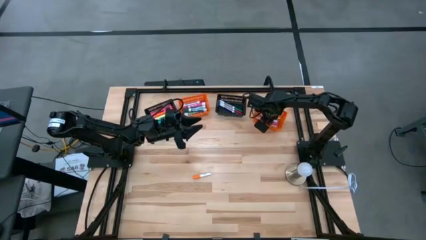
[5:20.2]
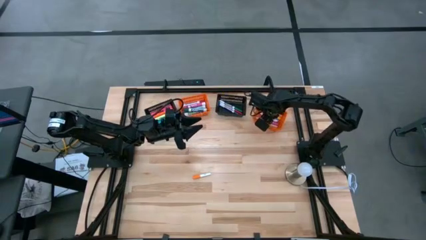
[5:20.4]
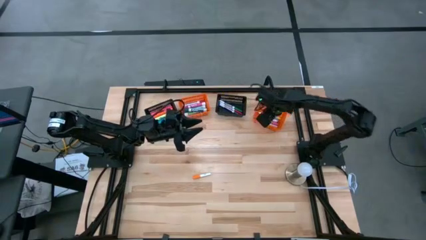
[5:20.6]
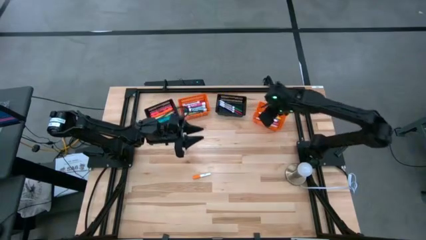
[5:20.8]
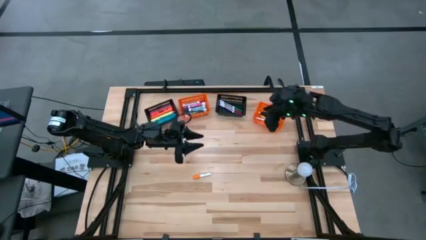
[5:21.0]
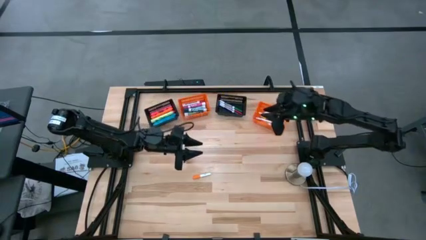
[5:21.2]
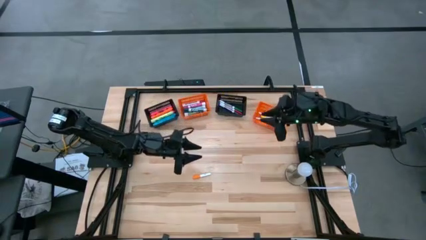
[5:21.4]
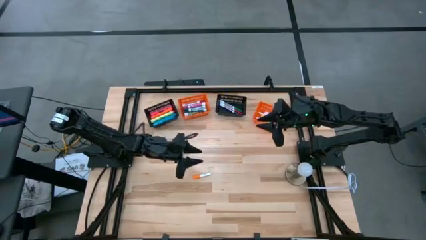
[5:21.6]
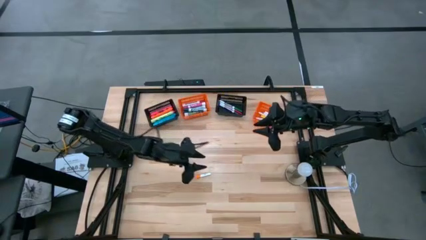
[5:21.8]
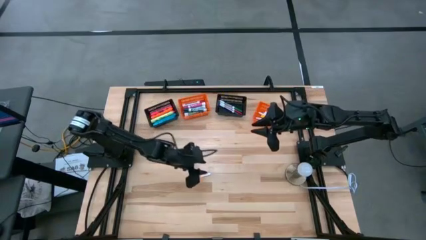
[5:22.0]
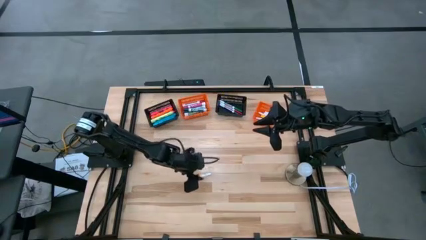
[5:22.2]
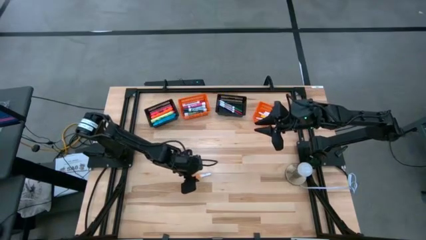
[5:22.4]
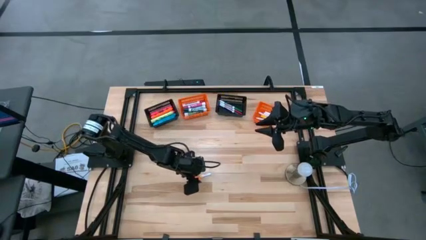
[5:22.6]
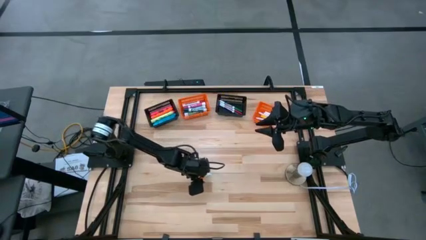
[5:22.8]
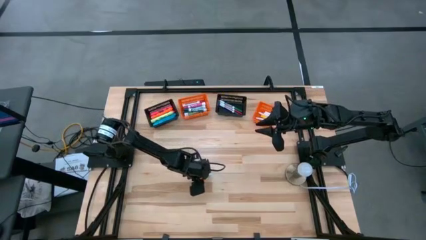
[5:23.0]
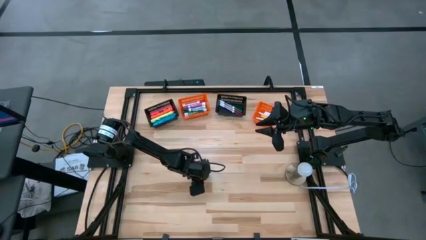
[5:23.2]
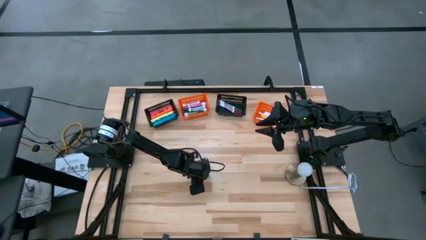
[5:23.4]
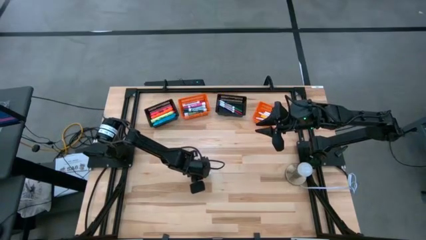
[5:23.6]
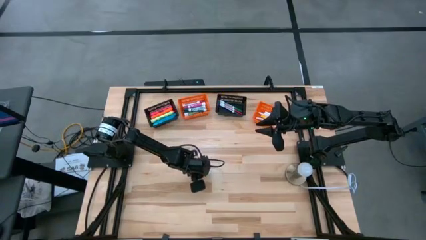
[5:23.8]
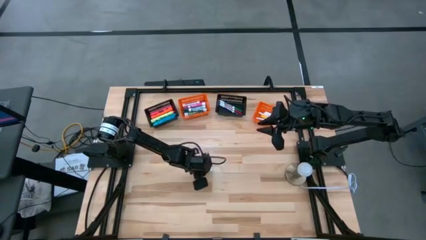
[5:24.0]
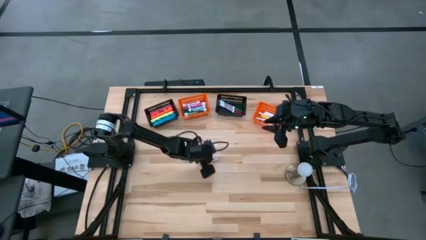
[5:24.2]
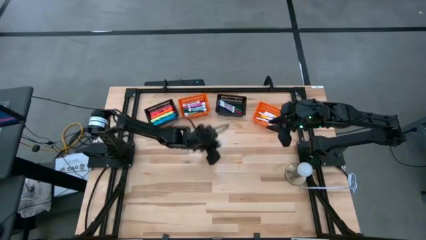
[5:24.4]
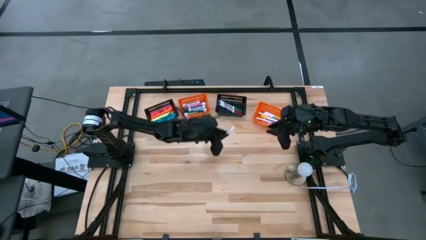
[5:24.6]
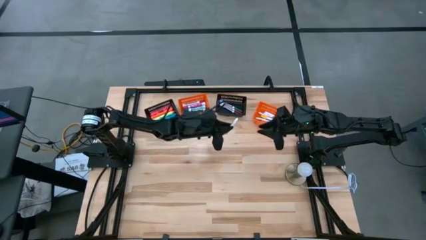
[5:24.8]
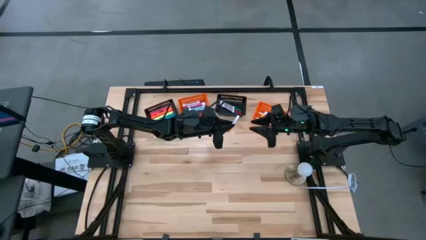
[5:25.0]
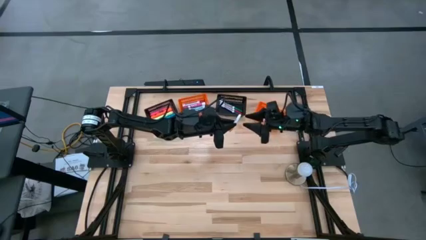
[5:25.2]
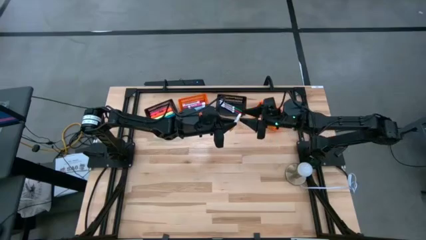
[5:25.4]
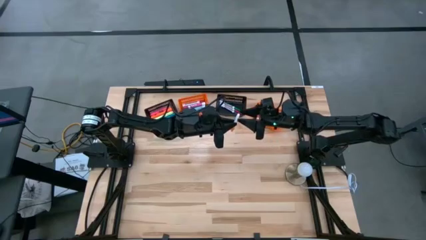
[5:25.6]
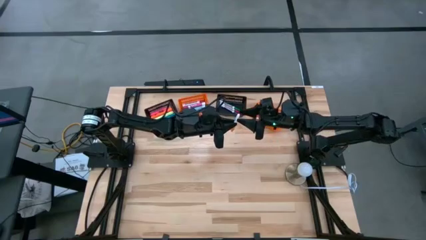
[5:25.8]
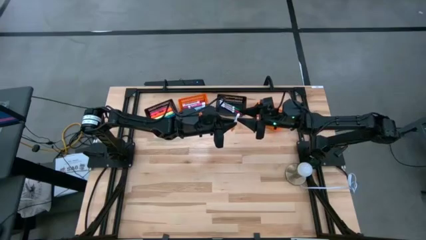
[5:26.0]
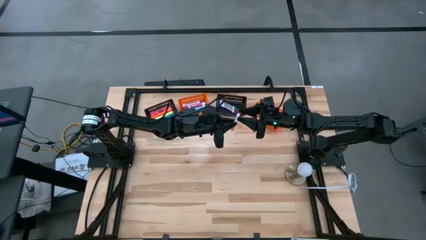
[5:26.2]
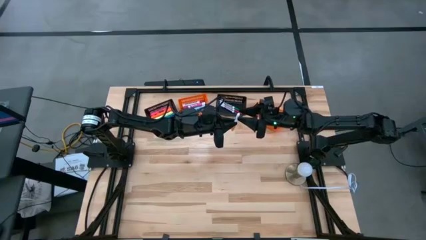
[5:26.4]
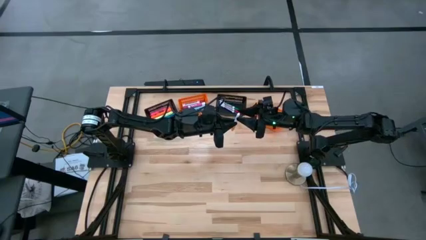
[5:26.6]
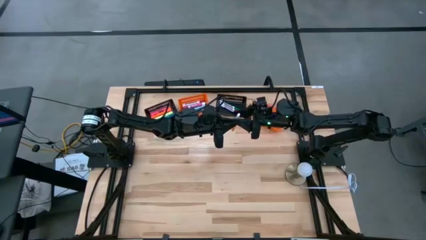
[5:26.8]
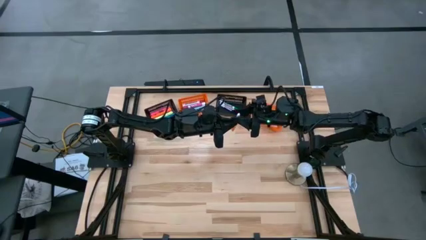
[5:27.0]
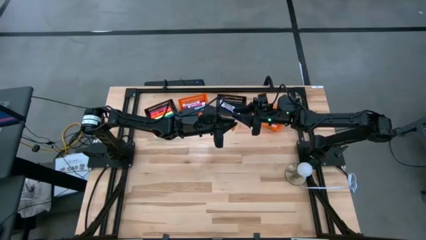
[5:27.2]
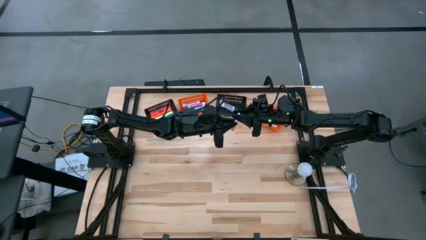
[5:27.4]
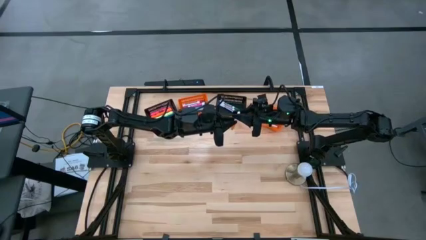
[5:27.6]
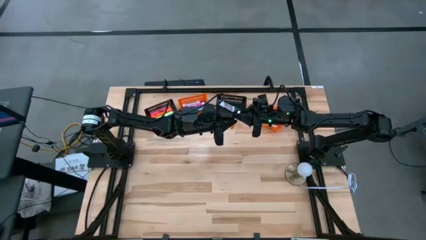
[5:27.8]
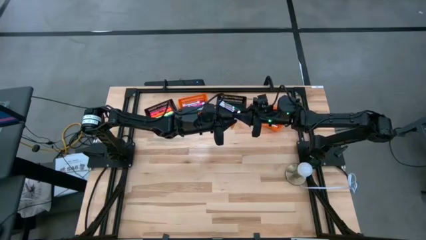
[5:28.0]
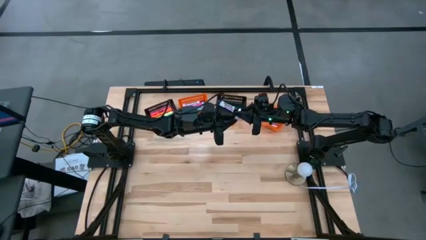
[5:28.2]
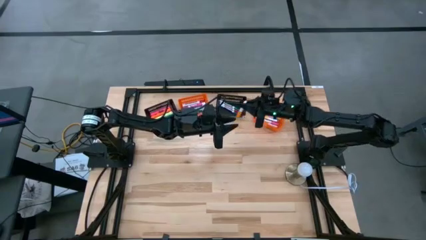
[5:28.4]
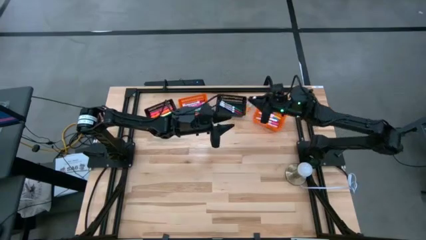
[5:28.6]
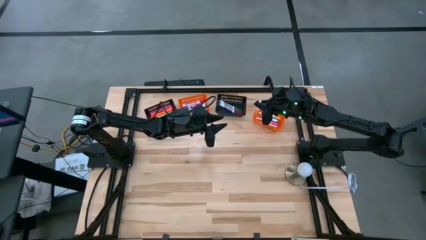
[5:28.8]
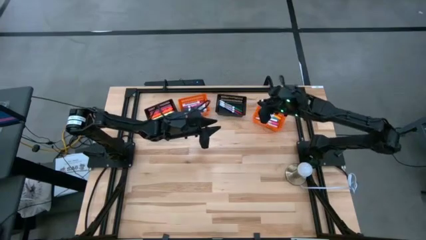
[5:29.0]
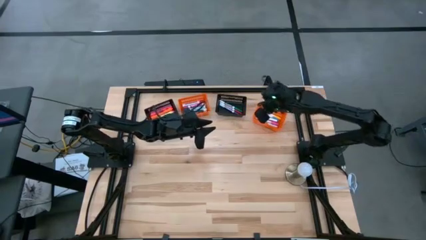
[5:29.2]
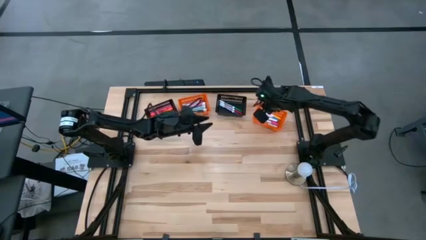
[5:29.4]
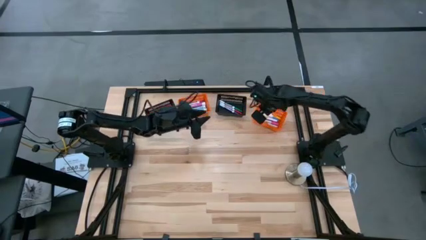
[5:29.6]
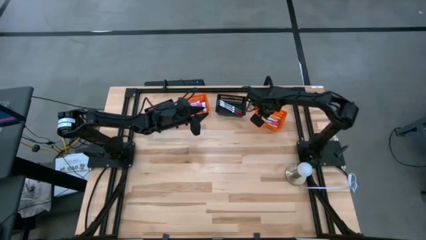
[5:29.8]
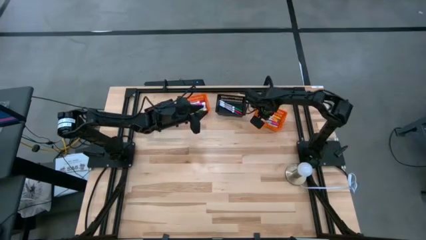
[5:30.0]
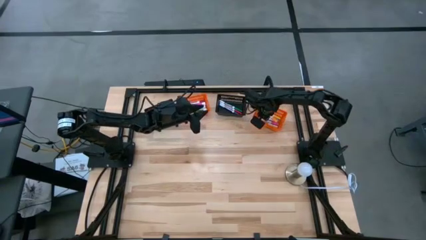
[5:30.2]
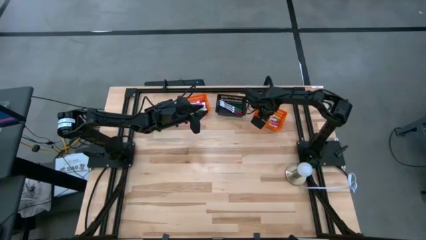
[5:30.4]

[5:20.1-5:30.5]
Task: Pick & Place Markers
Put the orange small highlighter pen into the left orange bin

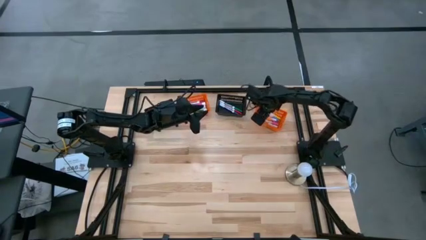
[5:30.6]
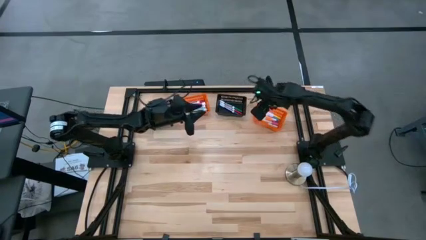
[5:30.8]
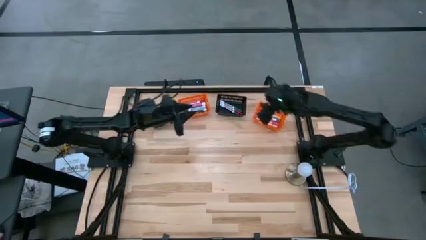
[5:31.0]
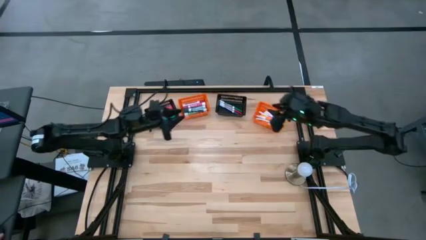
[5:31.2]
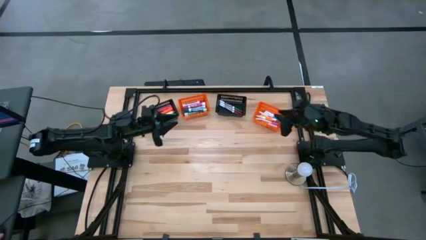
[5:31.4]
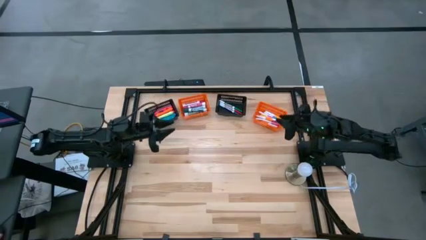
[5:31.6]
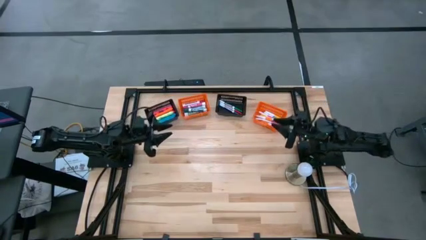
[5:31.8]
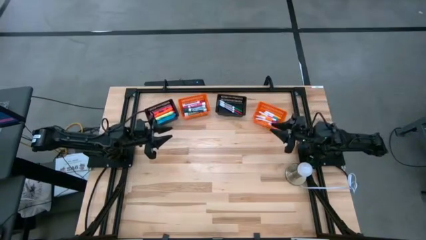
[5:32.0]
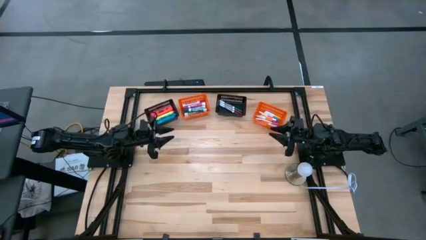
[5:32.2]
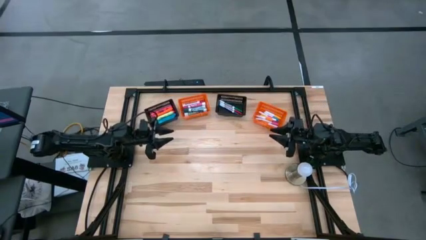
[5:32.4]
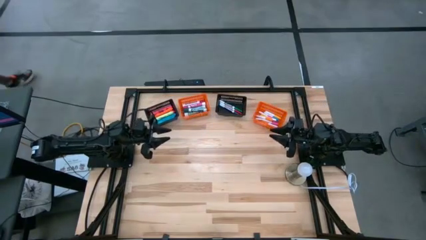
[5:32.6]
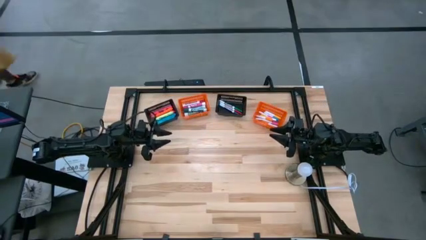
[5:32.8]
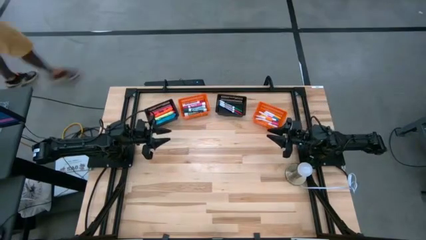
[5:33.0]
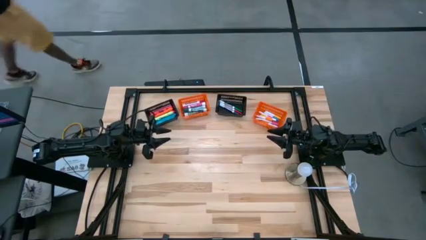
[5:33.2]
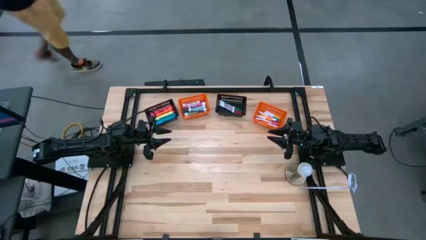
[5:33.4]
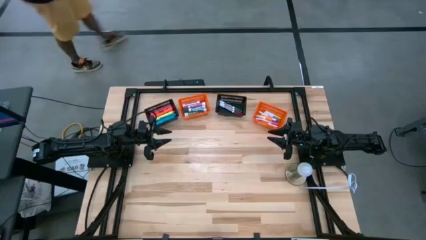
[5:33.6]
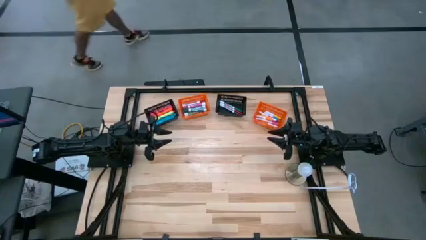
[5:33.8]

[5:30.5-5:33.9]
Return to Home Position

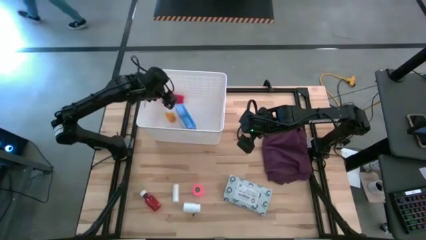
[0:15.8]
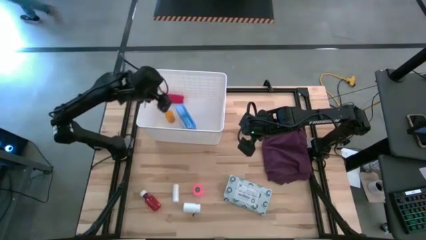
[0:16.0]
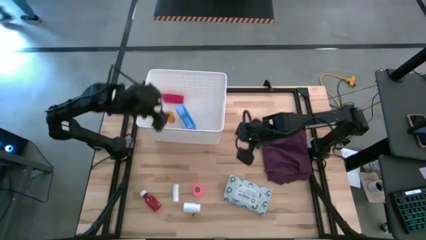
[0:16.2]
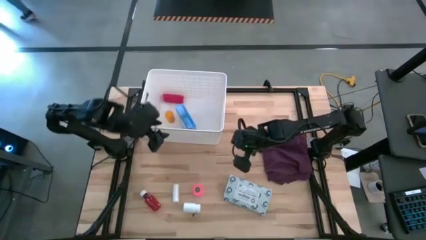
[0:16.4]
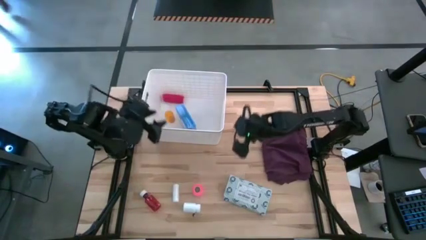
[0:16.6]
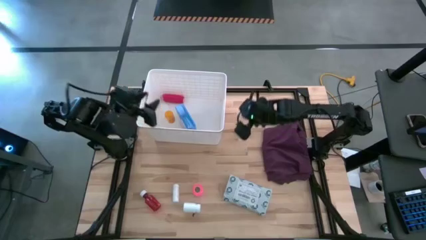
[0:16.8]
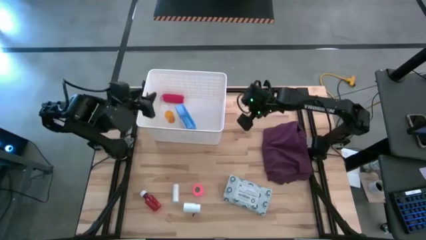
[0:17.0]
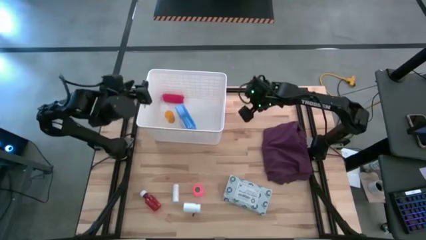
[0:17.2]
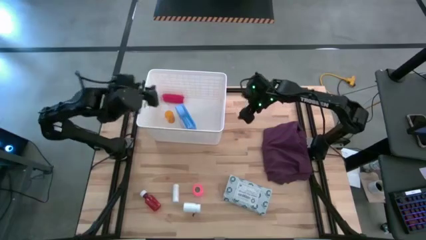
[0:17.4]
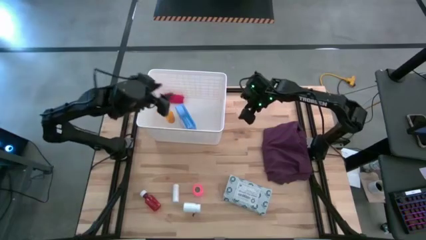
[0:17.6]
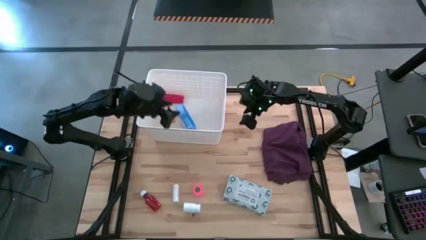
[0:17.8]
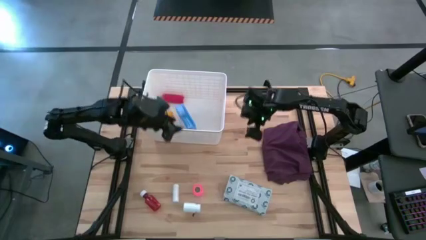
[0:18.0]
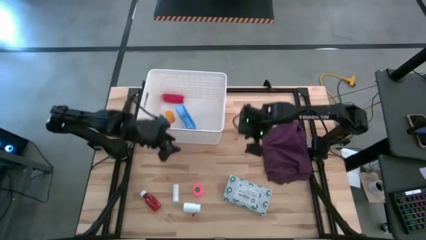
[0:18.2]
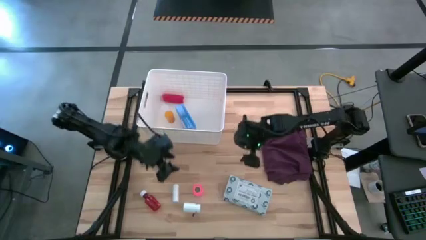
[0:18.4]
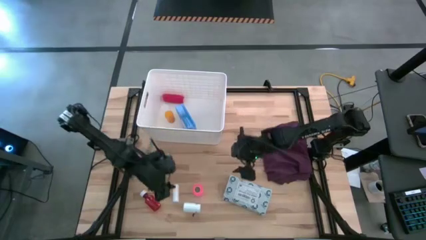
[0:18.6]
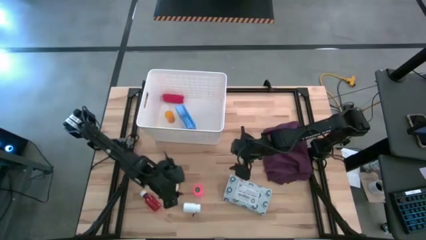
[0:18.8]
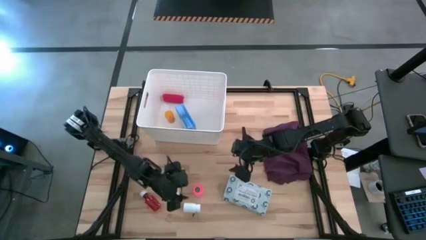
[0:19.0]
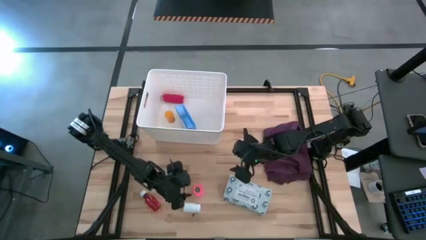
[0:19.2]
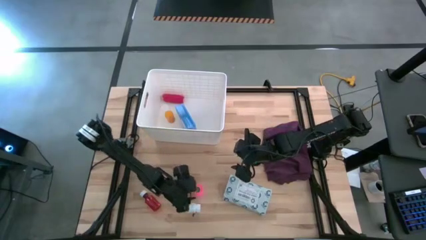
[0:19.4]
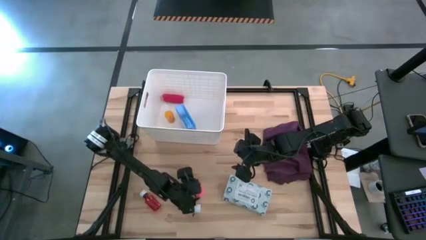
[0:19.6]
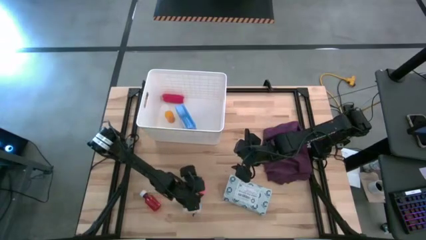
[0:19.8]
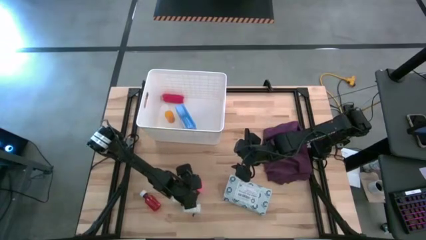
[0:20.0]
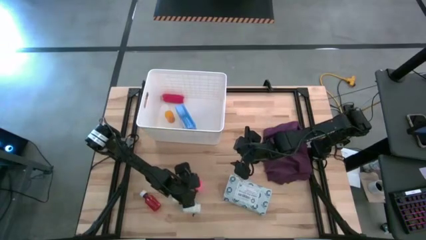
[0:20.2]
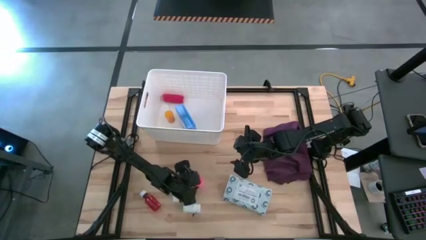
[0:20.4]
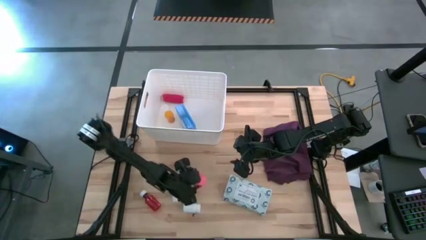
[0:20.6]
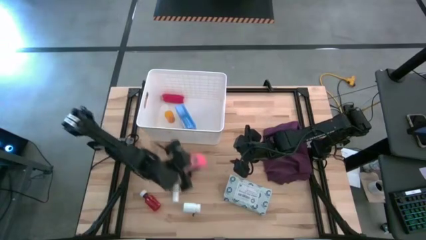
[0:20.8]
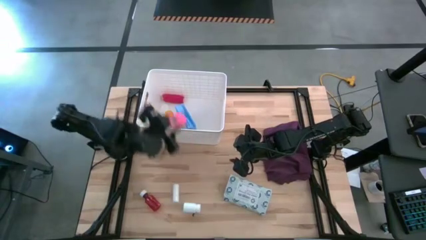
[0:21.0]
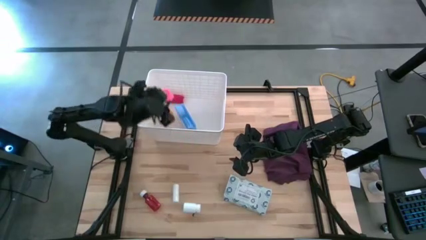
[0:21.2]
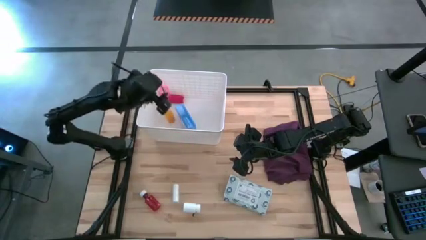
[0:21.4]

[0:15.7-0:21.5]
Task: Pick & place medical supplies in basket/bin
Put the pink bandage into the white bin
